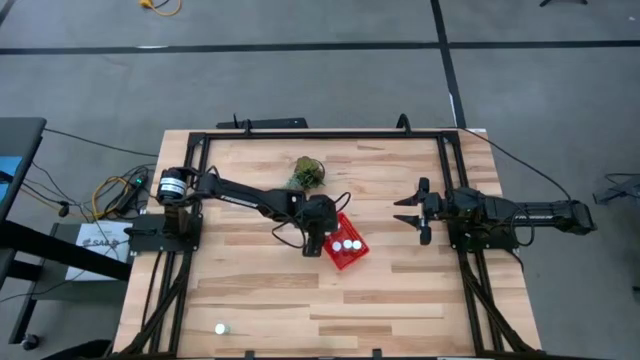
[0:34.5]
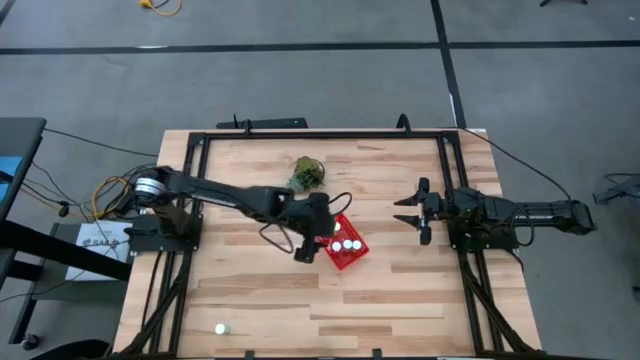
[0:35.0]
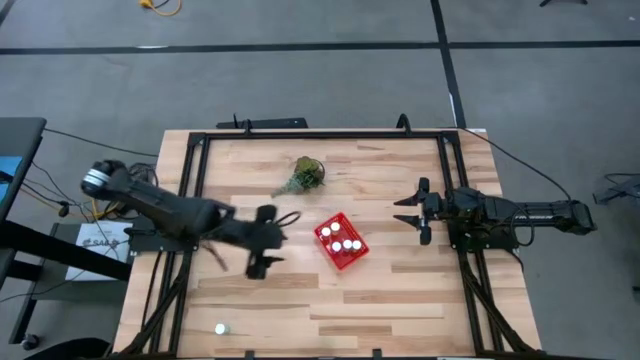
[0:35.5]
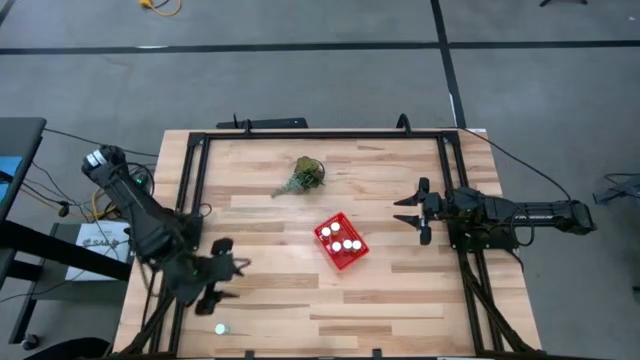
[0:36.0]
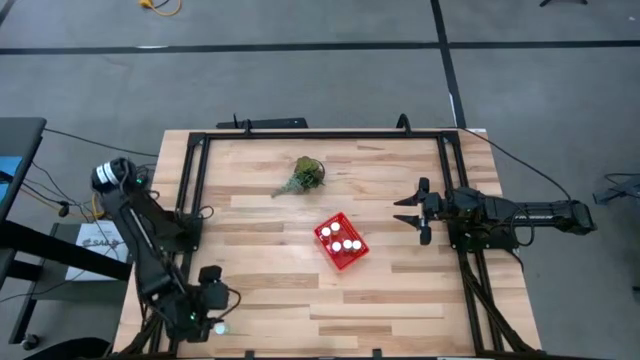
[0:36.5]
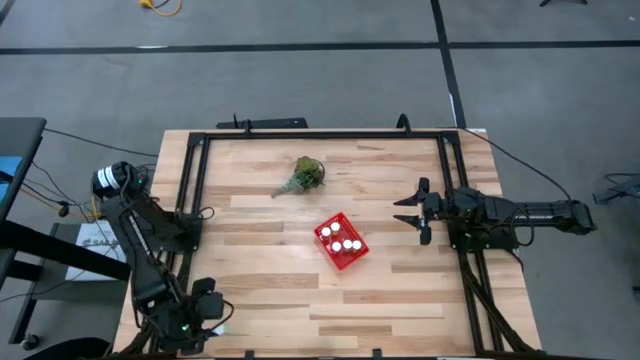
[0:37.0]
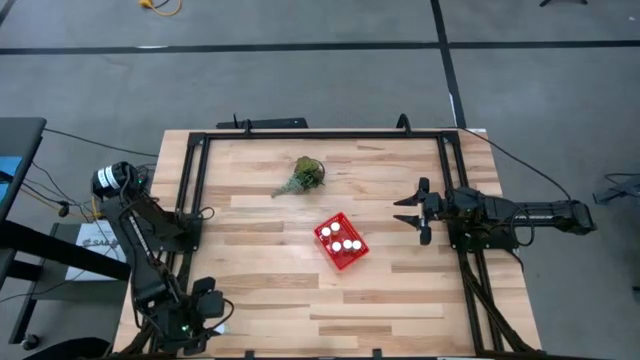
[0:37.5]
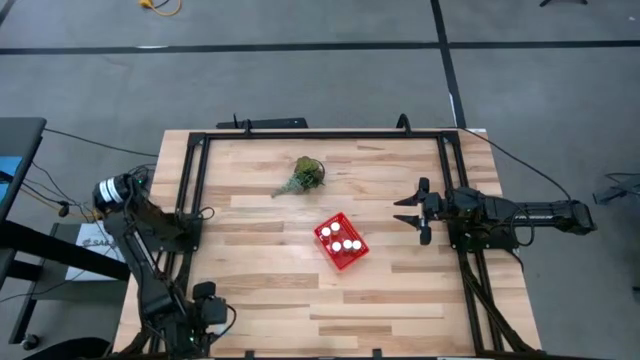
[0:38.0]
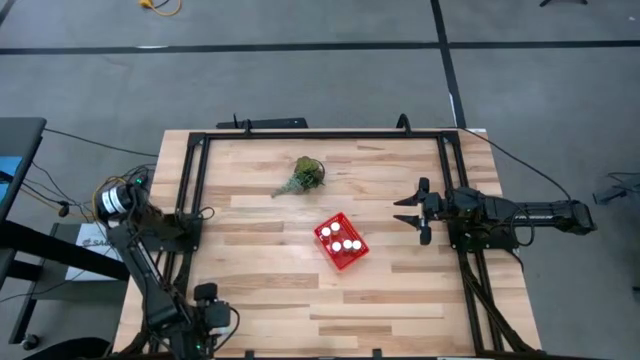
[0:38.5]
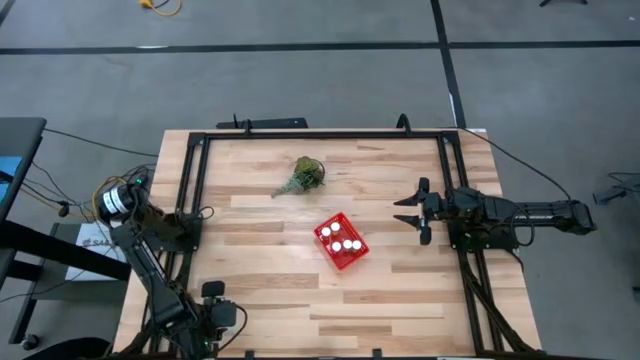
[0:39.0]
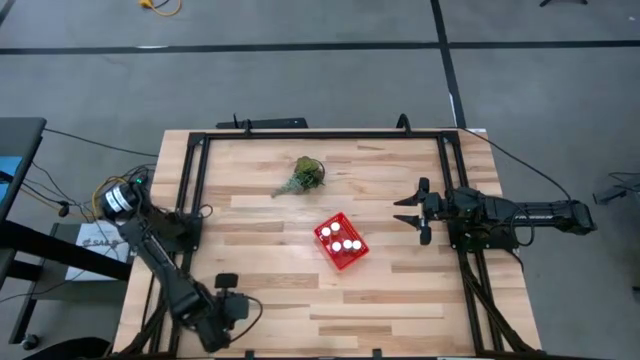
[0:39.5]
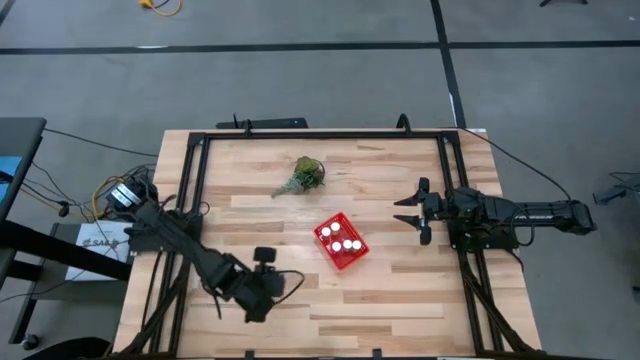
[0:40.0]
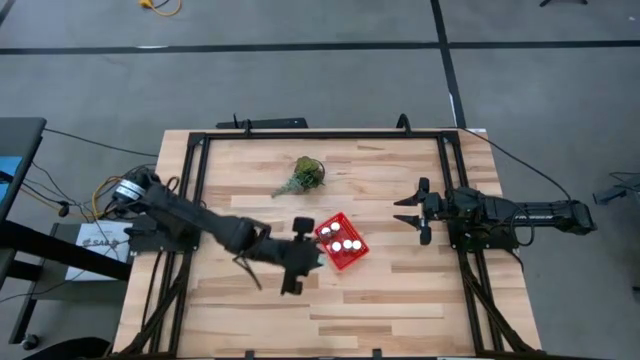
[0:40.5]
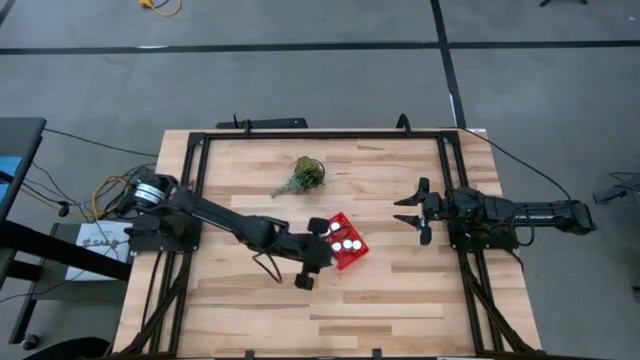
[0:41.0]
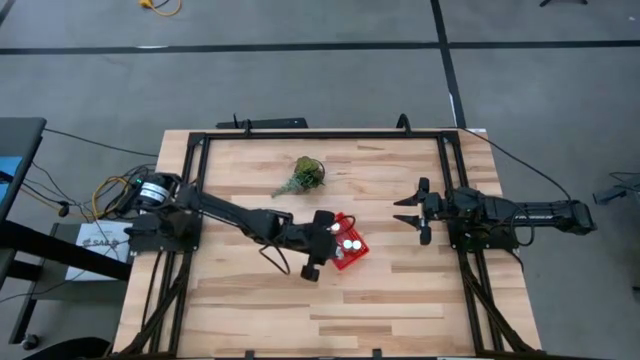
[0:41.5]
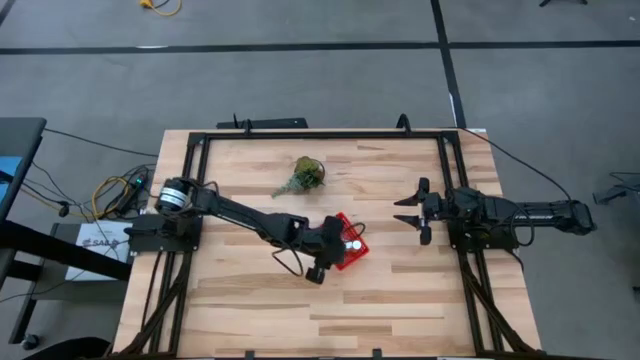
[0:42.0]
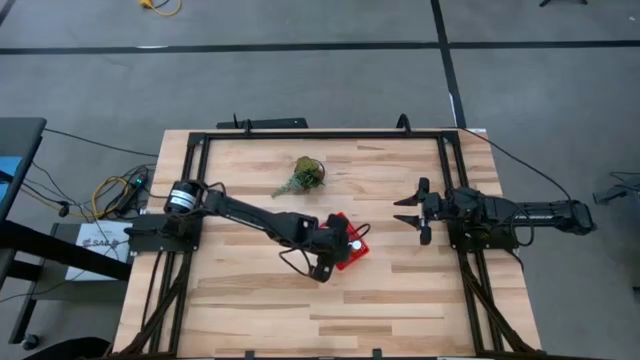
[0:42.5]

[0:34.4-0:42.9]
Task: Pick and place pill bottles into a basket
Put the blue pill bottle into the red bin

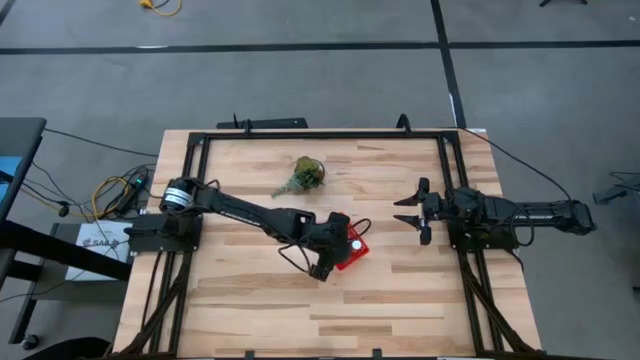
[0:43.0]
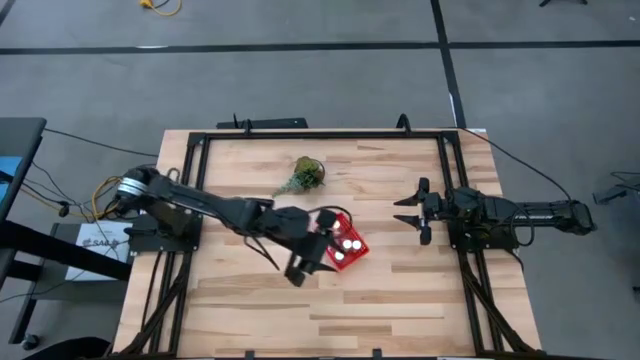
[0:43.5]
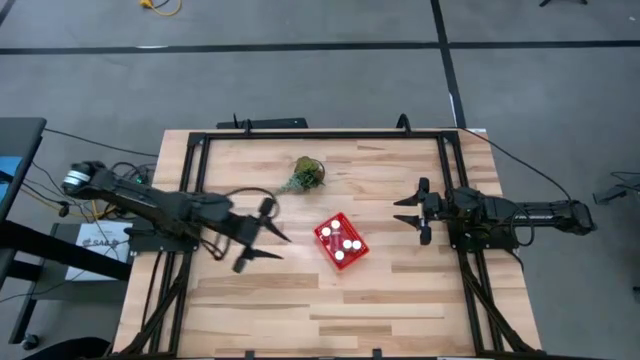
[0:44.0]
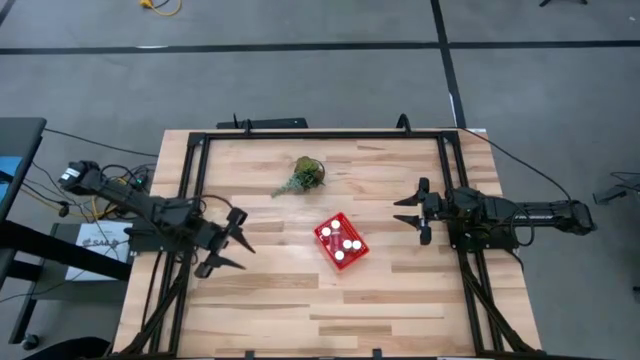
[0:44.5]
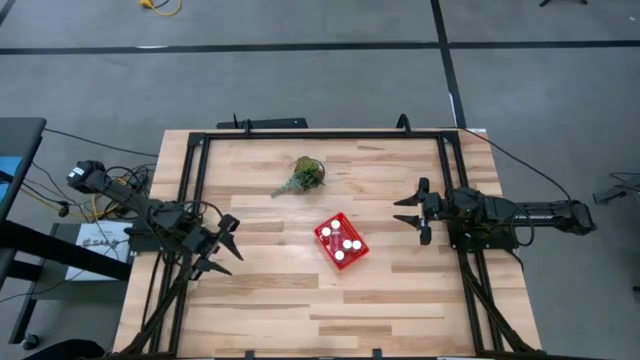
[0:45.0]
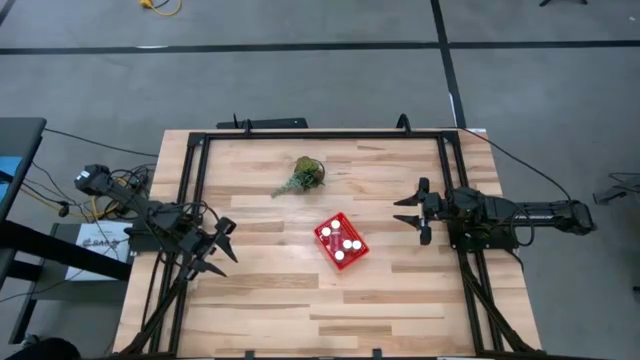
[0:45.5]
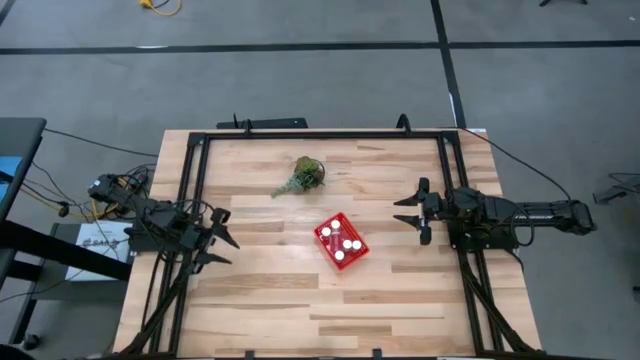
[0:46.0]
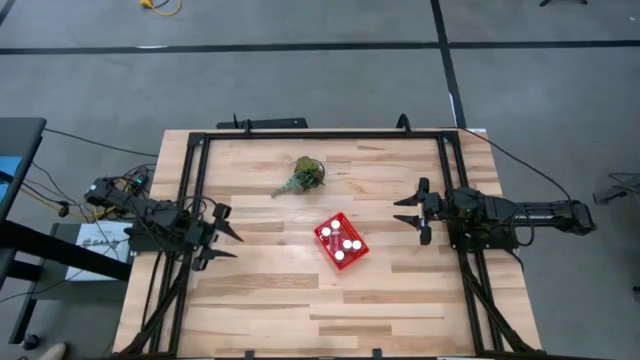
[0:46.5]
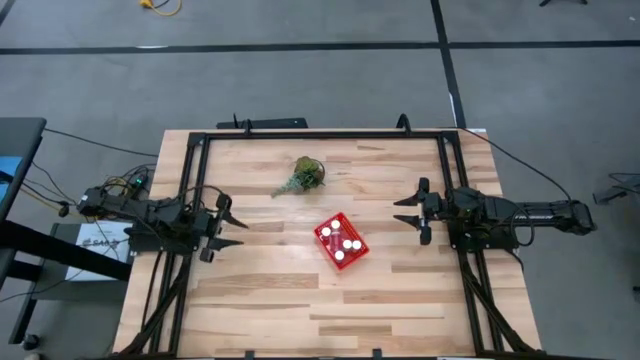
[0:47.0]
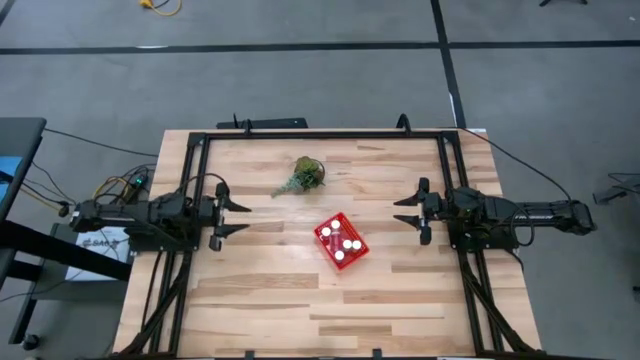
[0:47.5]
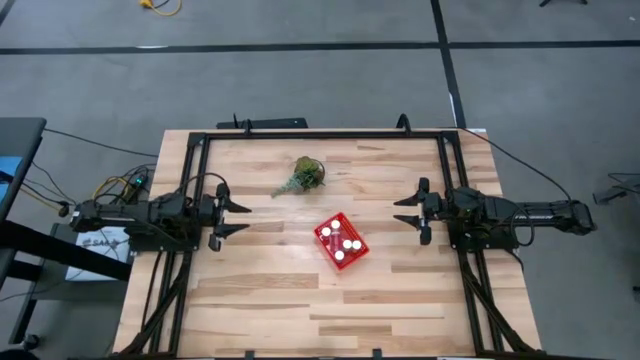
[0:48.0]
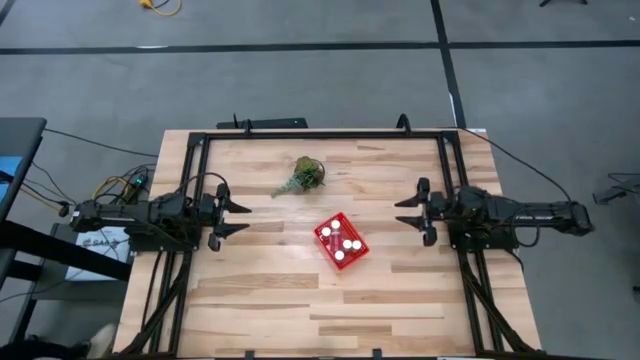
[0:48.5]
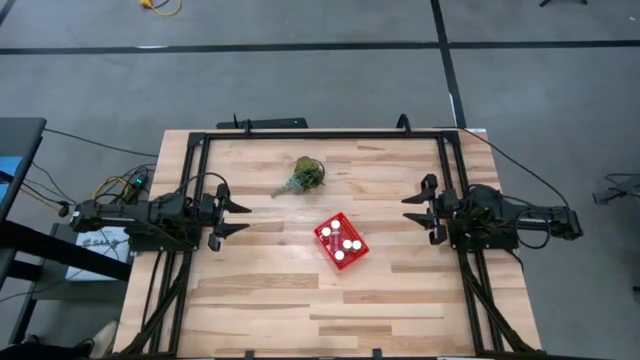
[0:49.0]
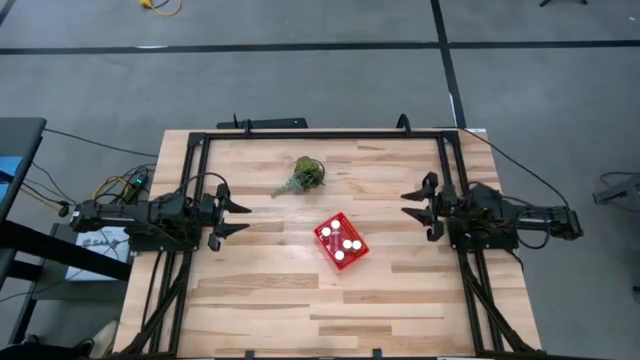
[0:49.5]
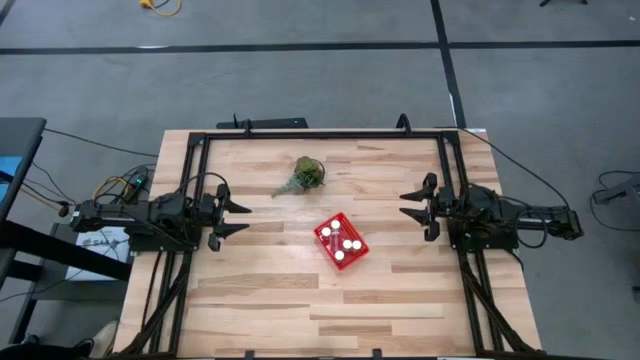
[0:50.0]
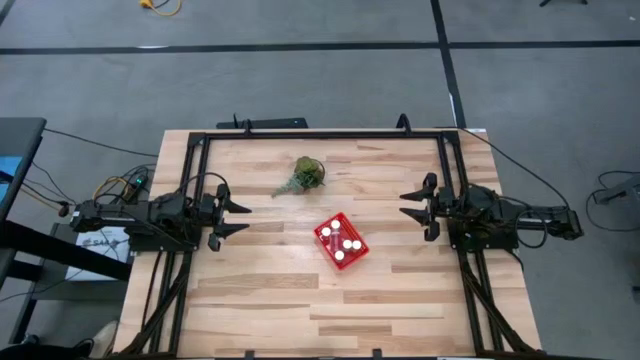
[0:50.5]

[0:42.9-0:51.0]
Return to Home Position

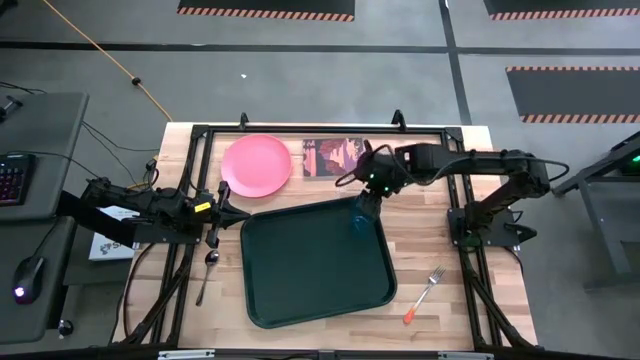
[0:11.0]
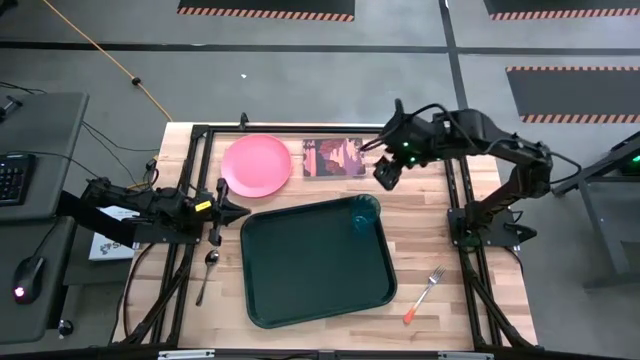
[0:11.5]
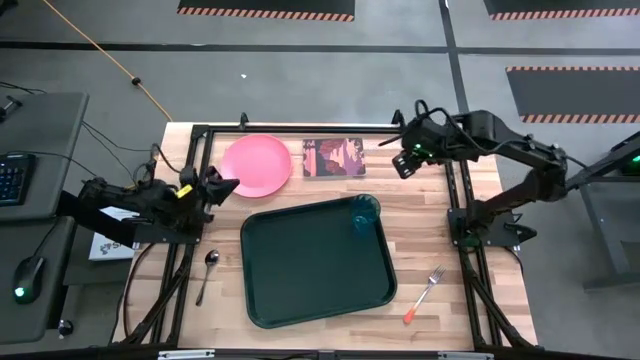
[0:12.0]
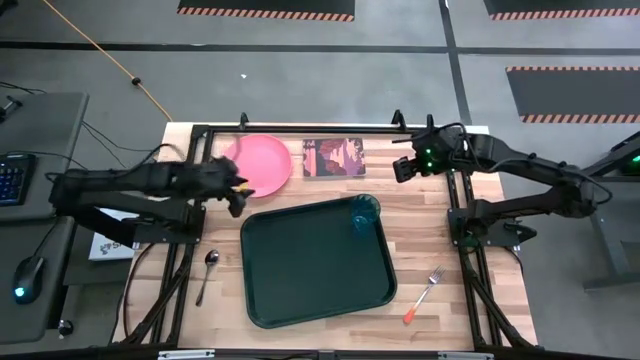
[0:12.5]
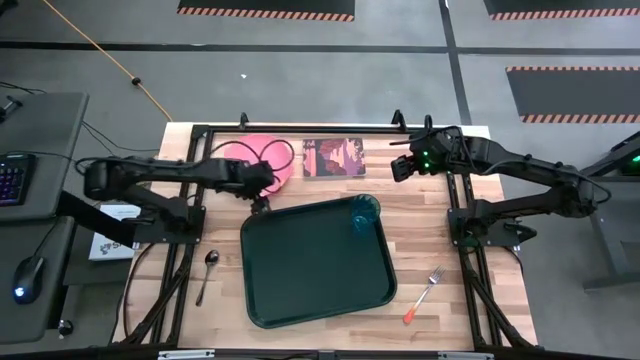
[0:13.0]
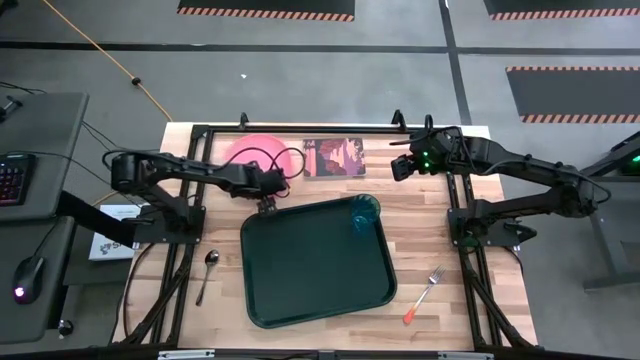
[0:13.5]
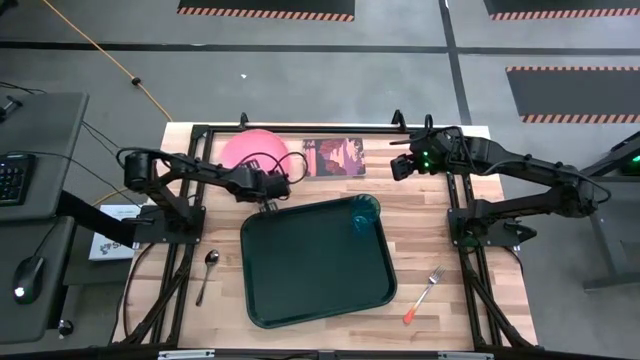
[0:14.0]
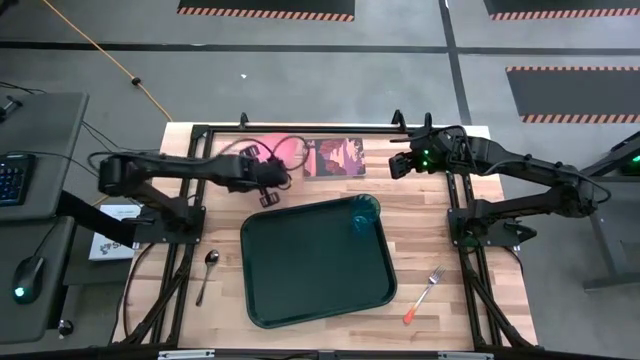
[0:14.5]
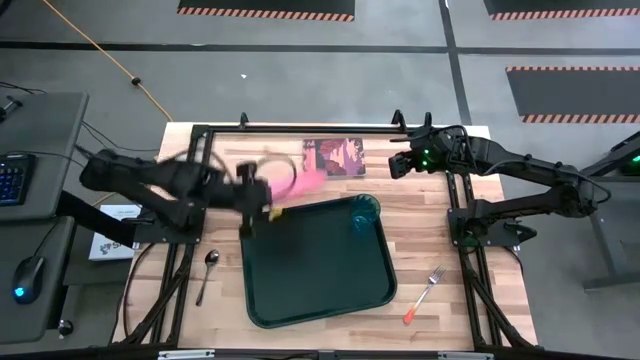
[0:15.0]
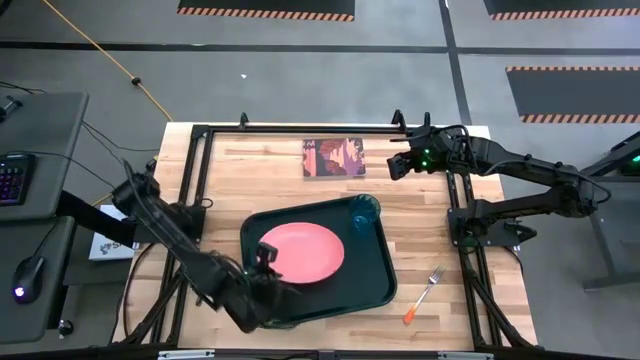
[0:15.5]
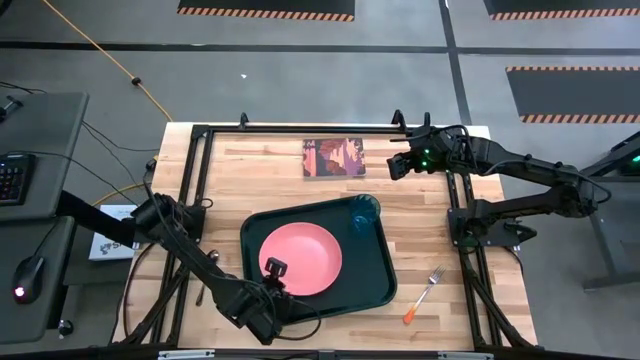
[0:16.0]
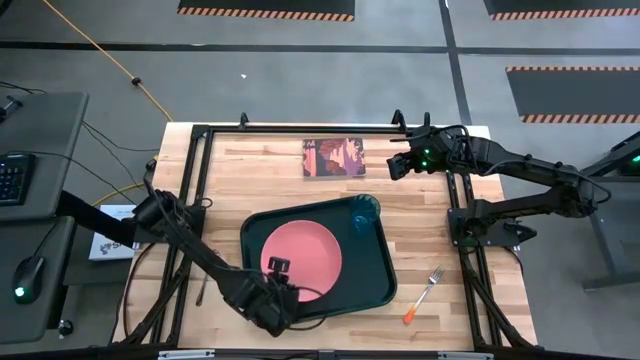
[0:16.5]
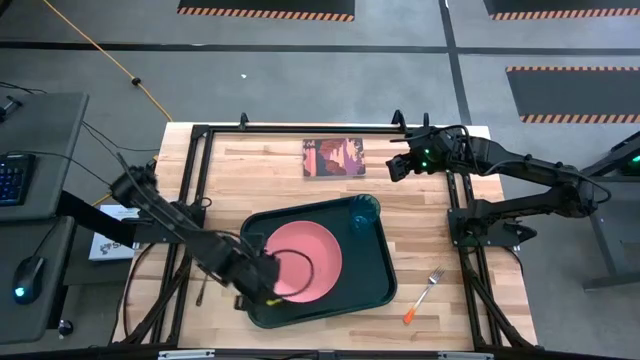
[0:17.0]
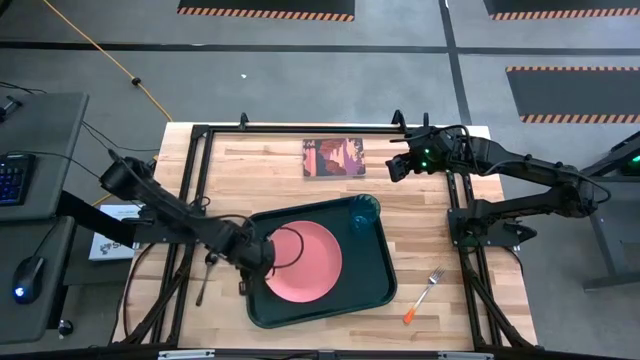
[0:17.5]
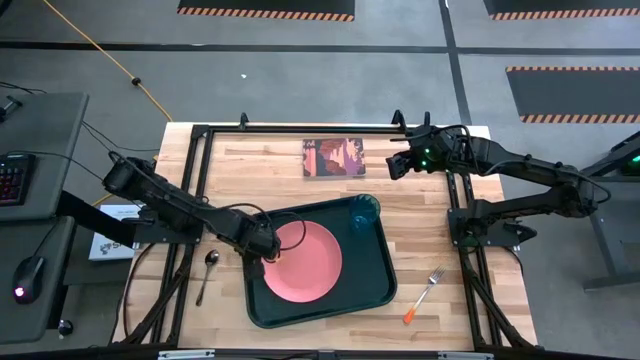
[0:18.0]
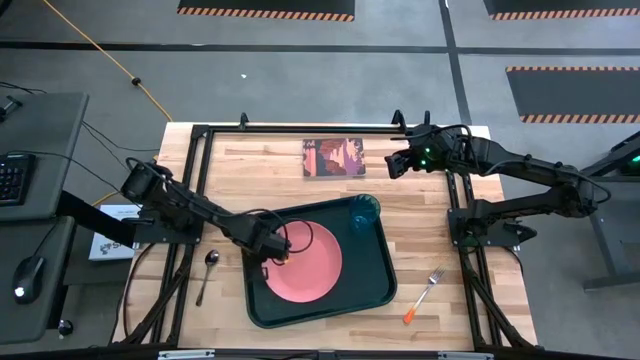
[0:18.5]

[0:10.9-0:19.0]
Task: Pick and place plate/cup/fork/spoon on tray
Put the pink plate to the center on the black tray
